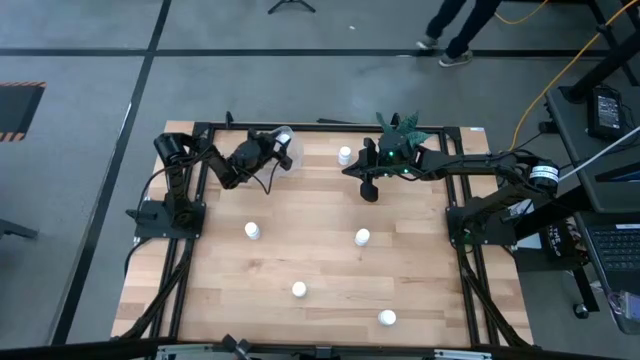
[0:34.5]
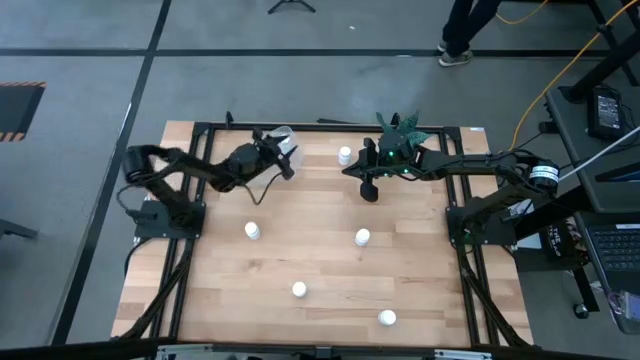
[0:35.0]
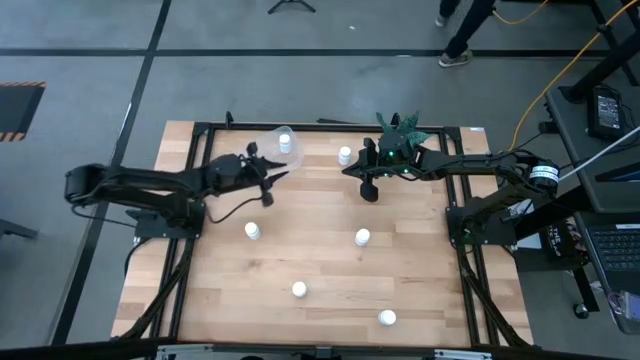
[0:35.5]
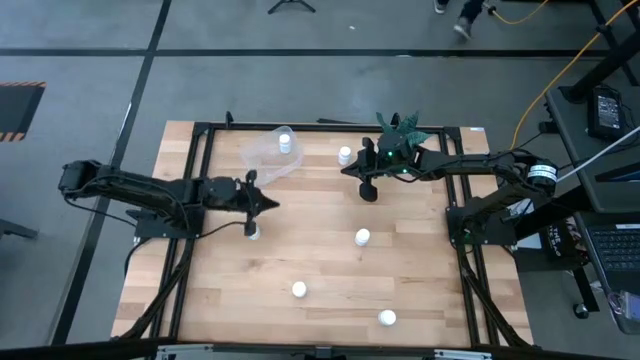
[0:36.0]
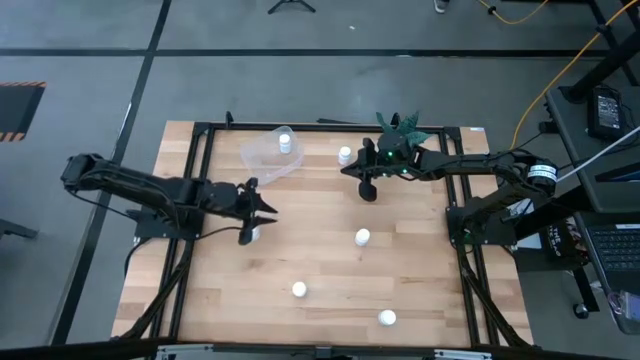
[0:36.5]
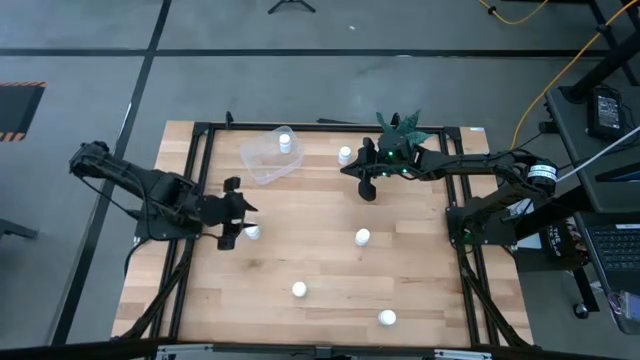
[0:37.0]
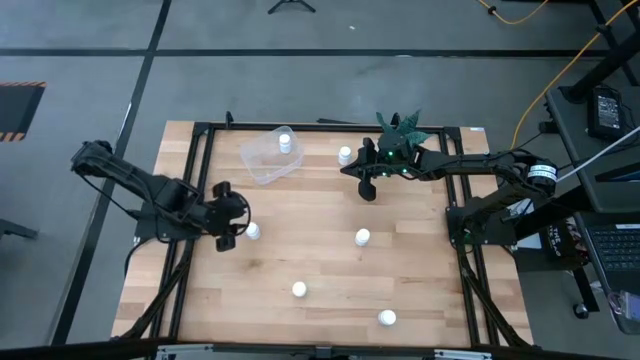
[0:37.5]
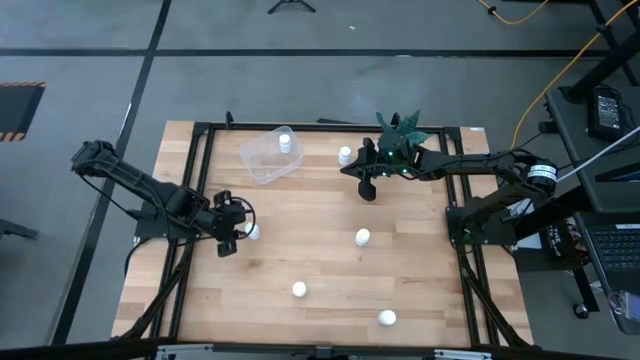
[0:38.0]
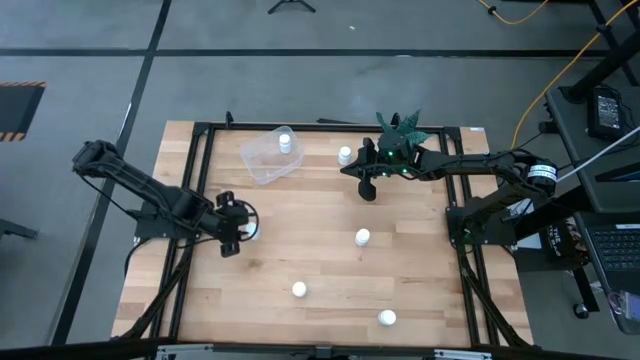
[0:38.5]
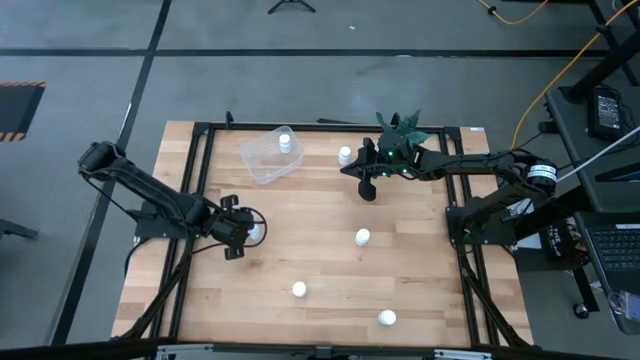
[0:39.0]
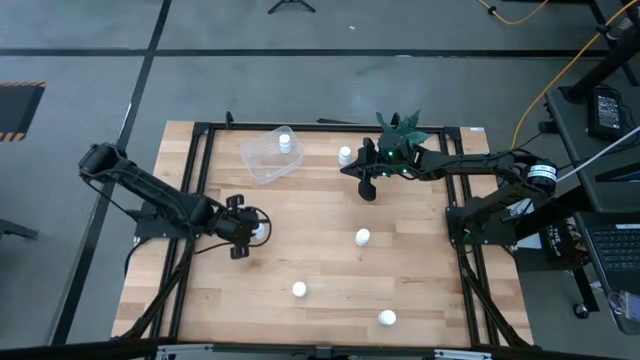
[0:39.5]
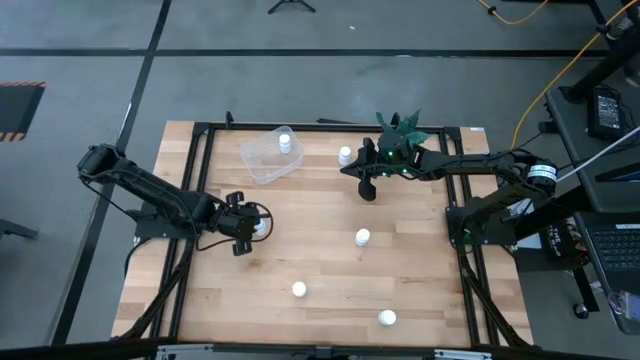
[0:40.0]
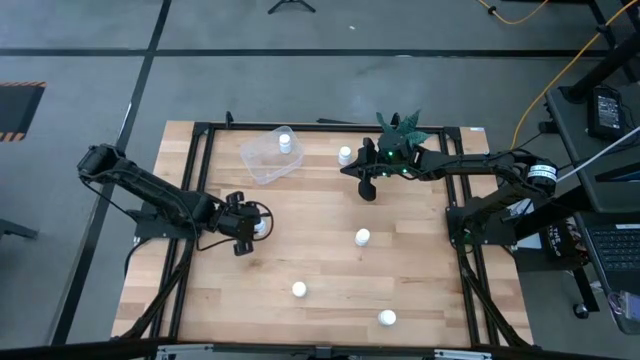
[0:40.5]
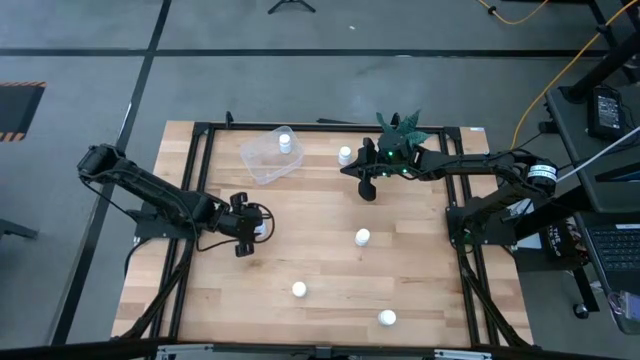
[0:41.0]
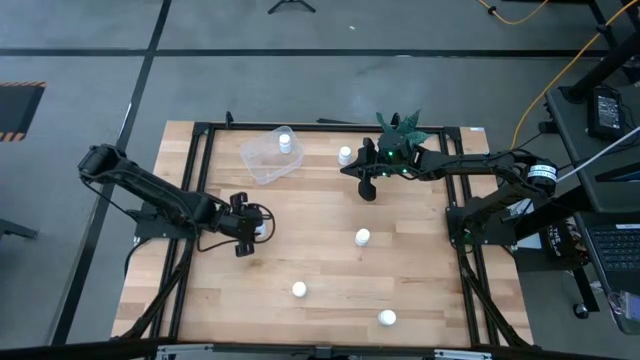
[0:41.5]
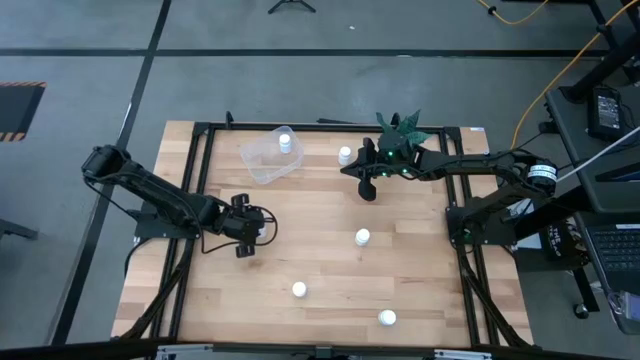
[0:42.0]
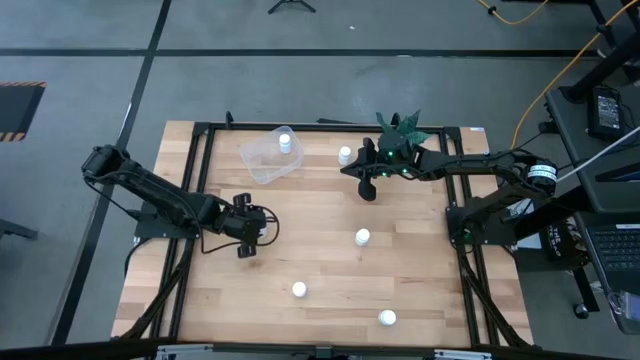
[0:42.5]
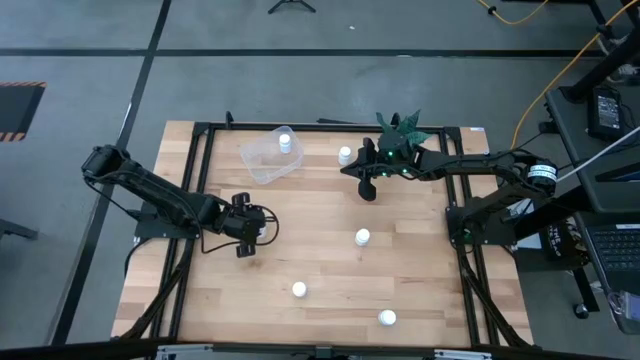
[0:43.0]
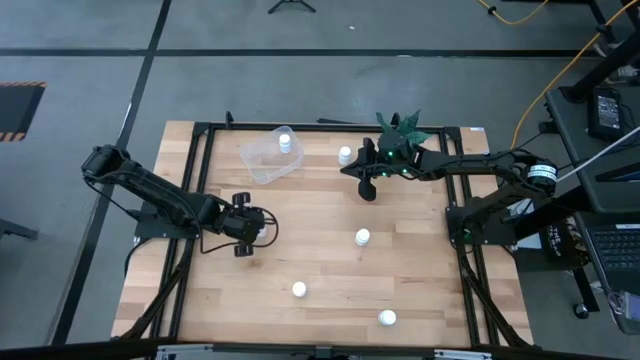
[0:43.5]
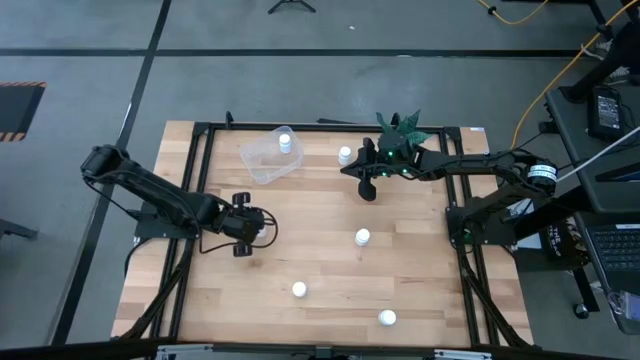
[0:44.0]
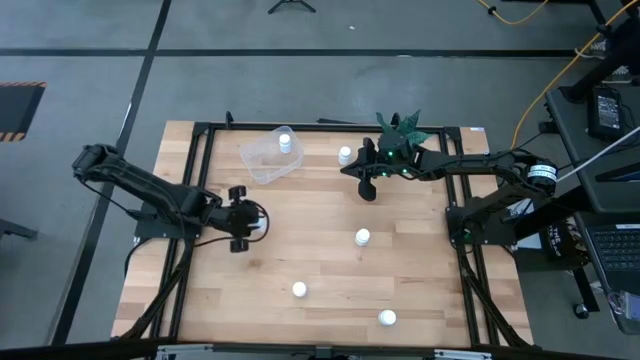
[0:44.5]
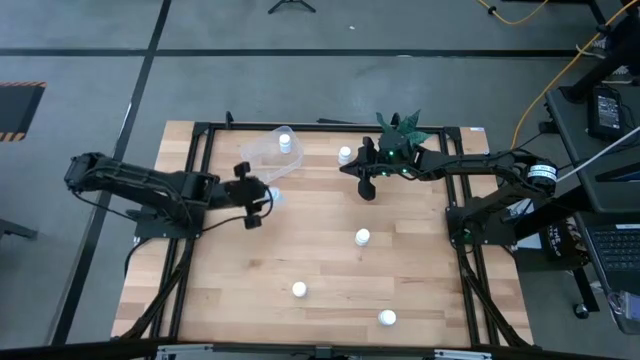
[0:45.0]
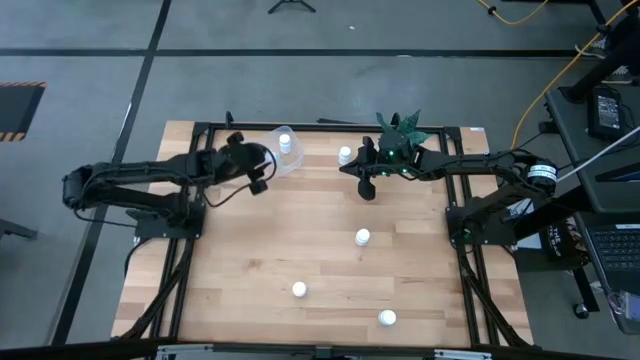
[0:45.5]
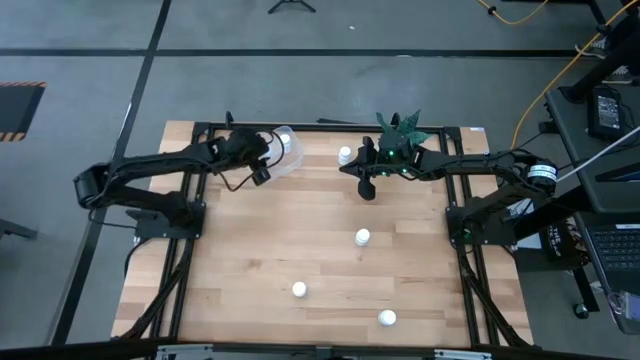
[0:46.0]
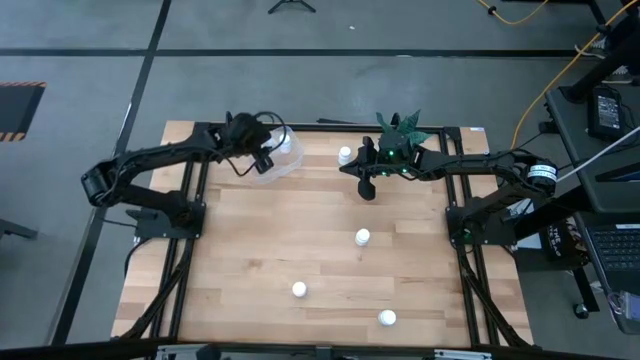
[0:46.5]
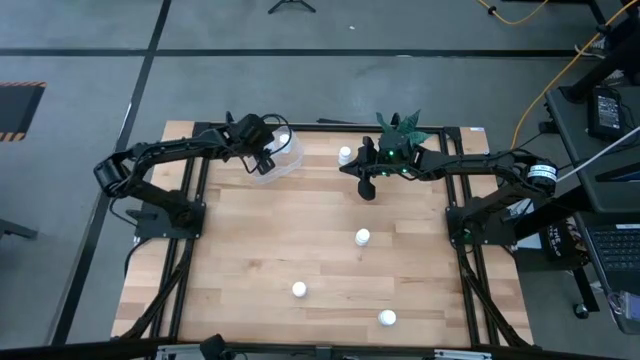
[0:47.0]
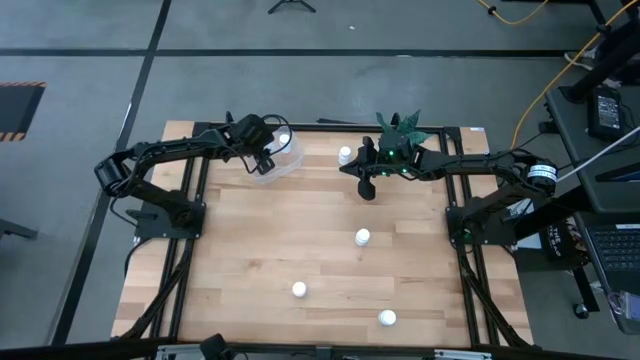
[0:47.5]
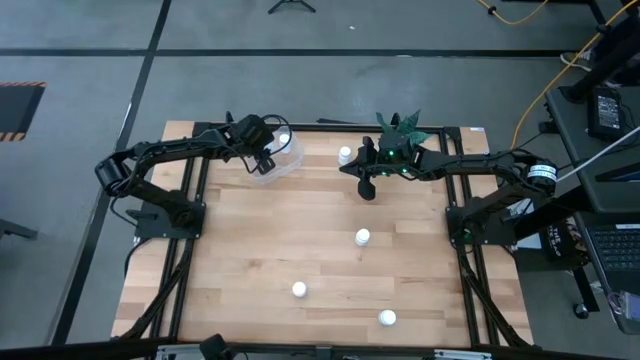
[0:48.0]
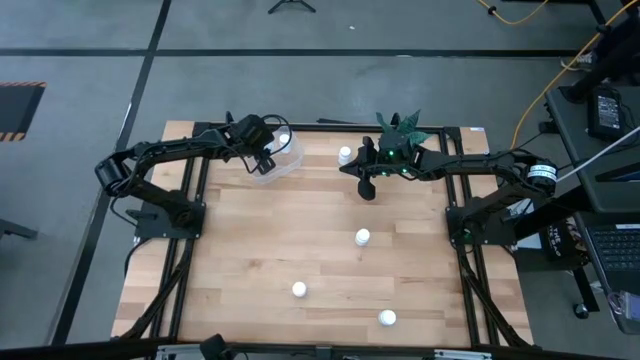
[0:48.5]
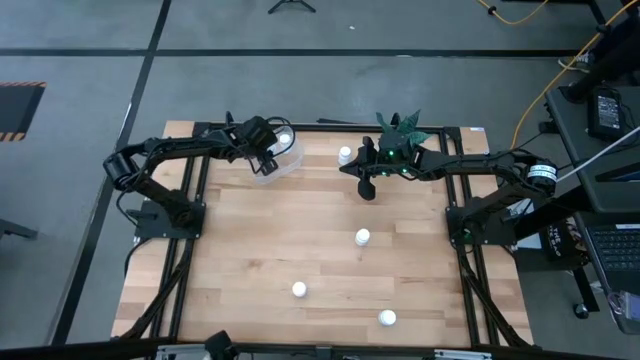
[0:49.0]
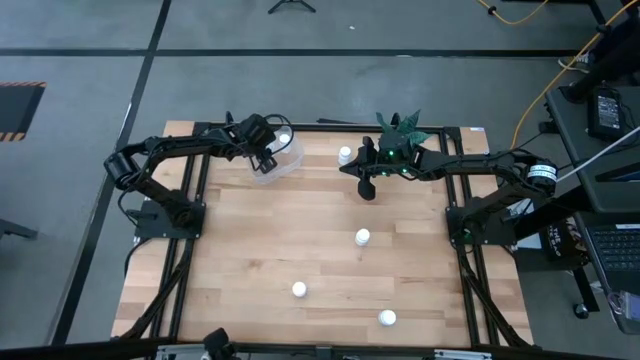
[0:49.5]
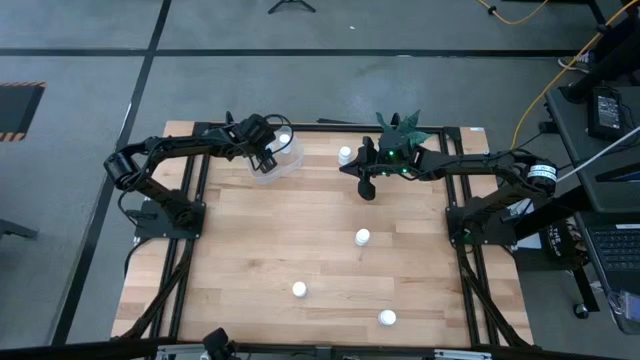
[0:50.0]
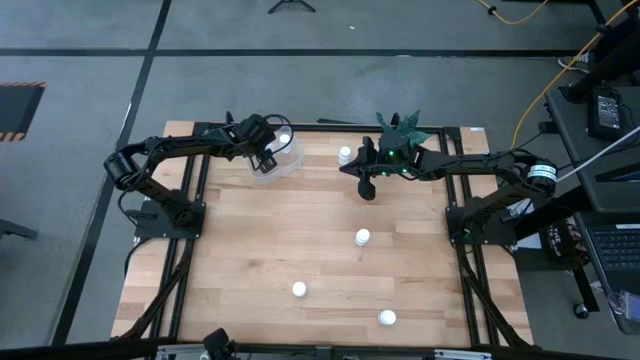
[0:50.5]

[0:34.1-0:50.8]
Task: Pick and place pill bottles into a basket
Put the white pill bottle into the transparent container

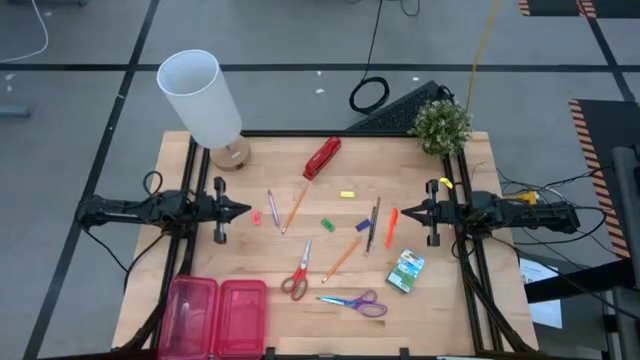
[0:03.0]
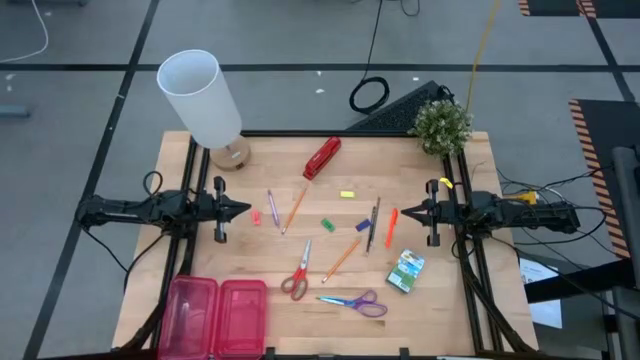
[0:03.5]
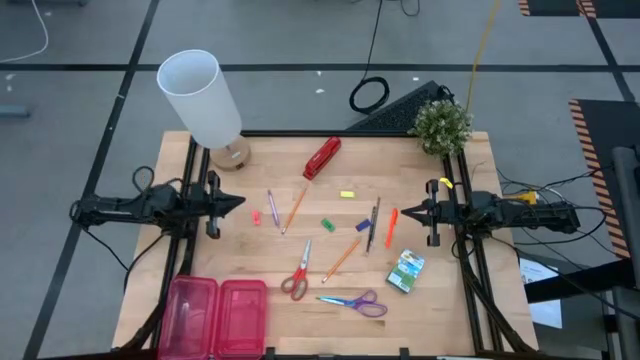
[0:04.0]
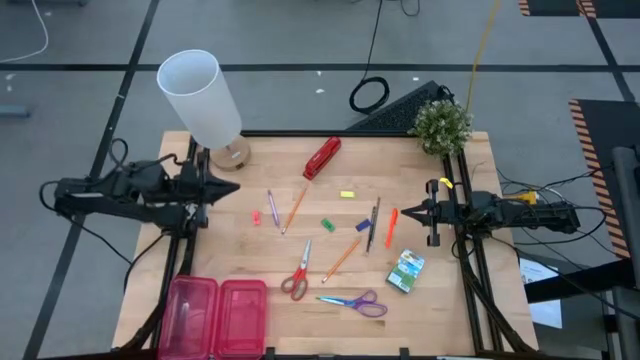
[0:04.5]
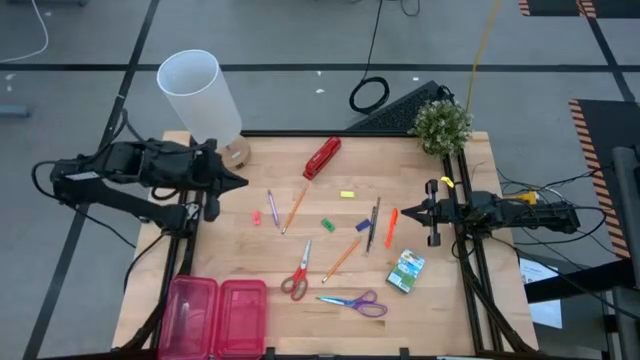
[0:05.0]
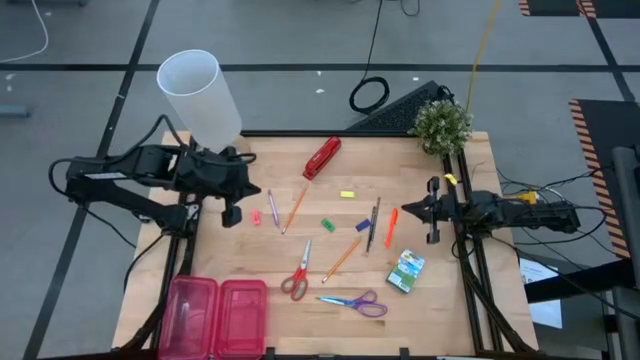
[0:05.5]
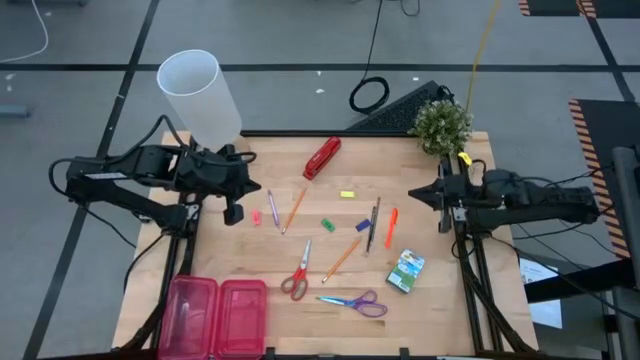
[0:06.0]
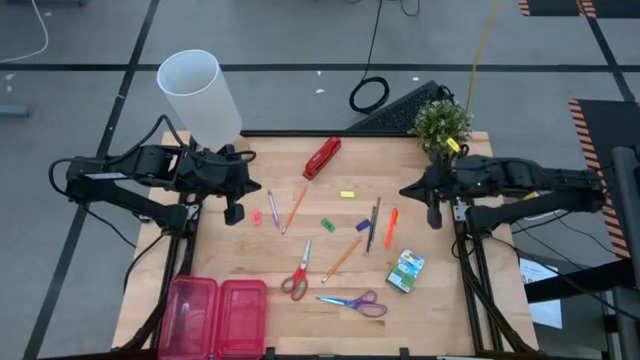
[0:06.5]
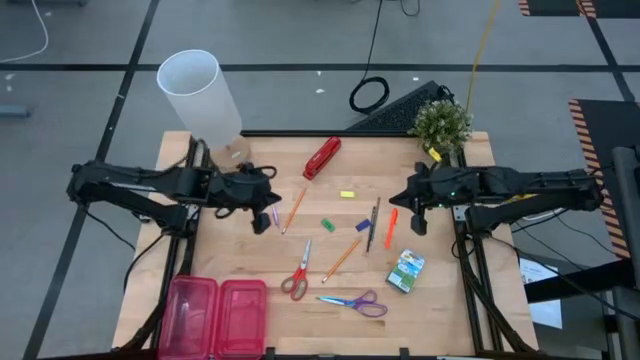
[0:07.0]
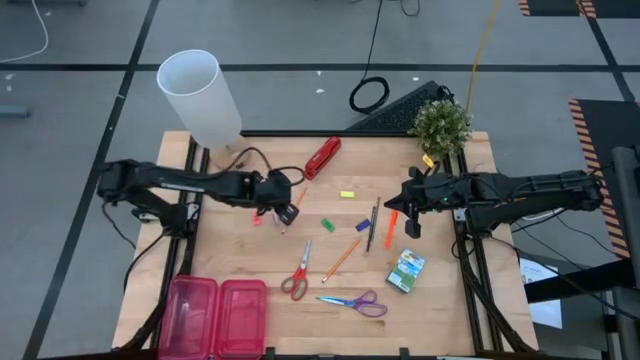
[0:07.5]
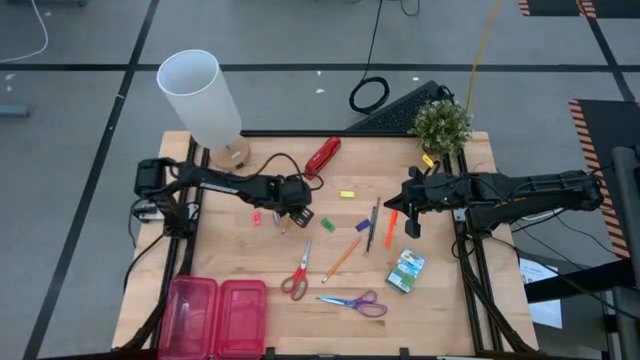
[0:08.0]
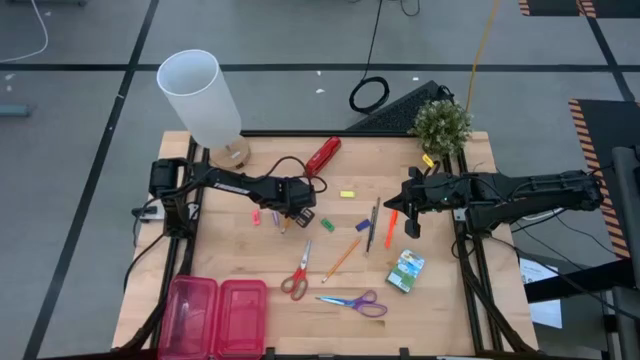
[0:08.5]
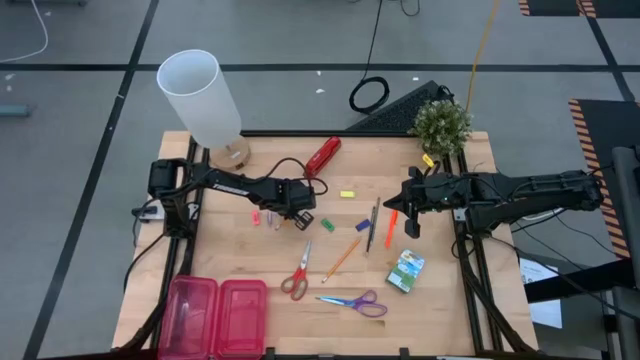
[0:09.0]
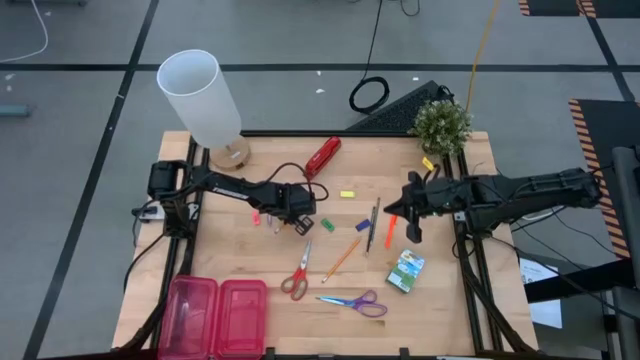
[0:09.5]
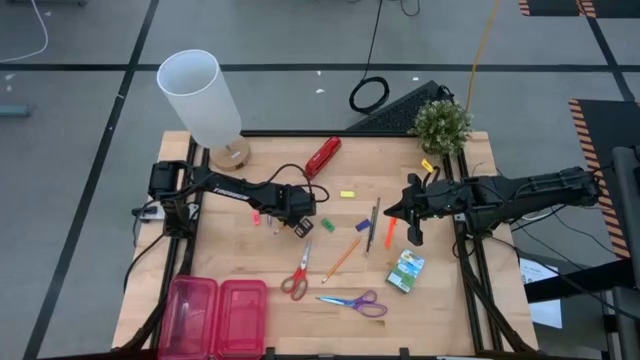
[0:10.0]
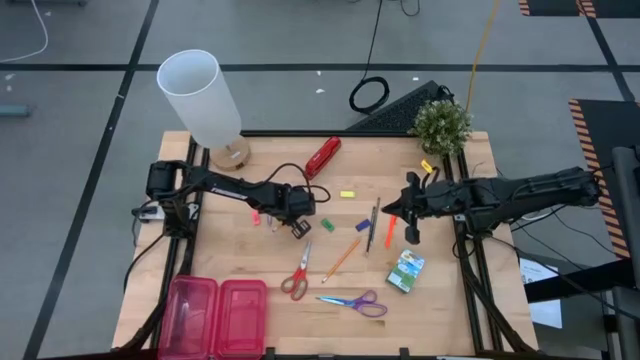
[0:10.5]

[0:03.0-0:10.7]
Task: Pack school essentials
Put the left yellow pencil into the red supply box
